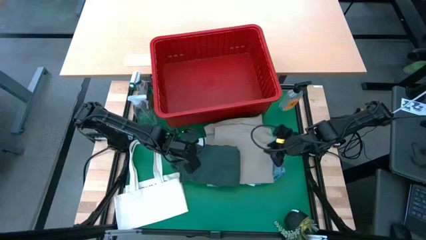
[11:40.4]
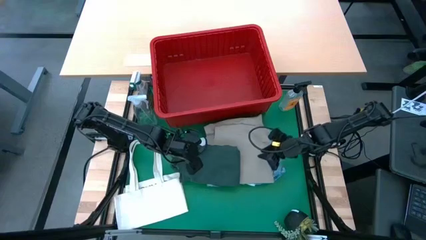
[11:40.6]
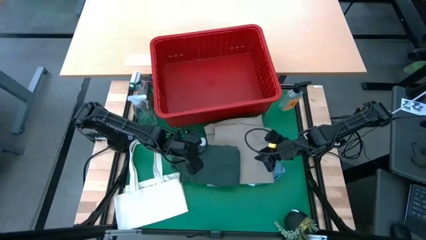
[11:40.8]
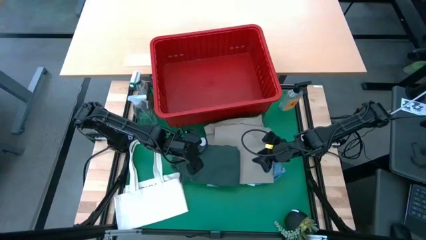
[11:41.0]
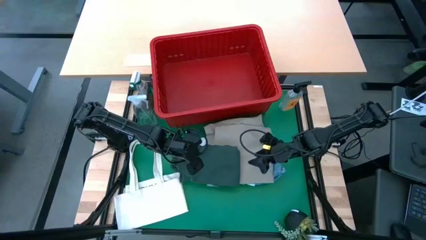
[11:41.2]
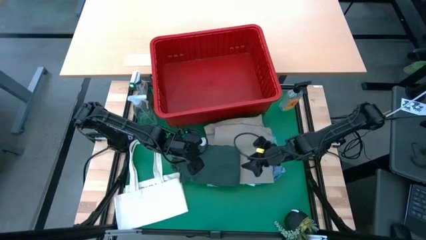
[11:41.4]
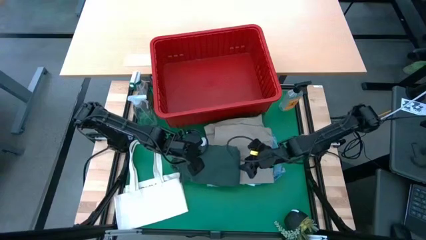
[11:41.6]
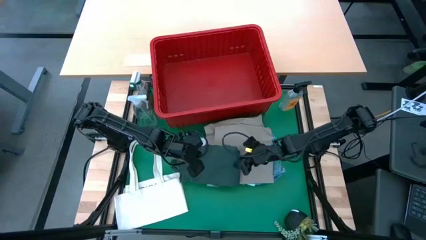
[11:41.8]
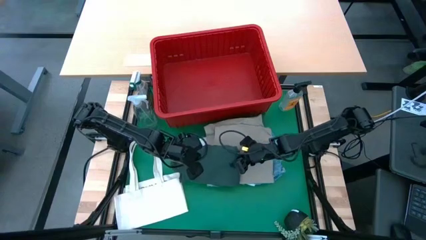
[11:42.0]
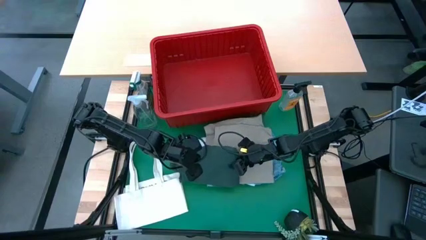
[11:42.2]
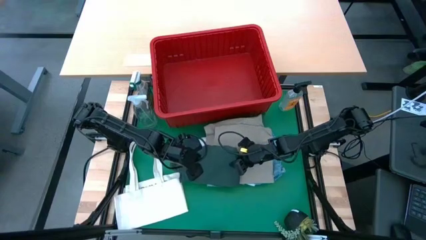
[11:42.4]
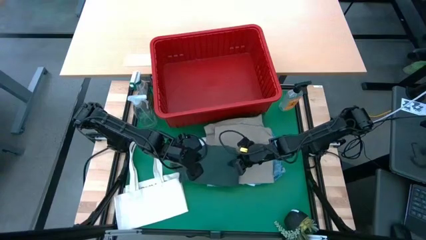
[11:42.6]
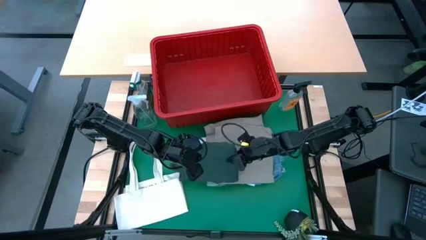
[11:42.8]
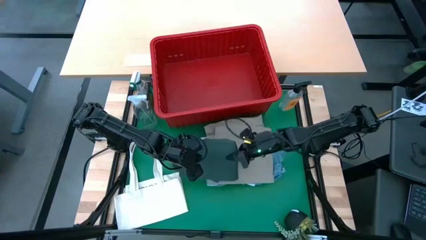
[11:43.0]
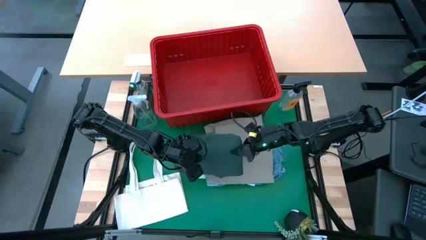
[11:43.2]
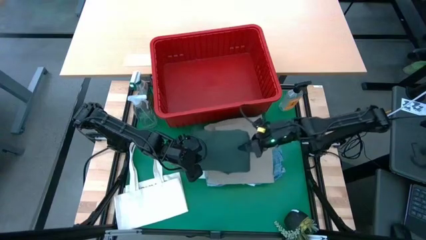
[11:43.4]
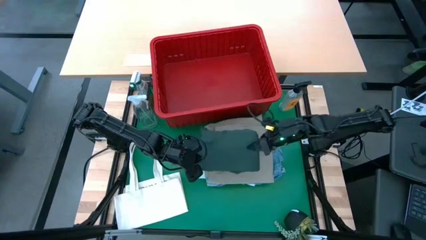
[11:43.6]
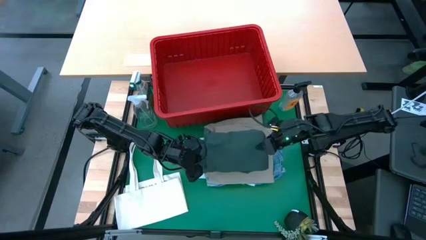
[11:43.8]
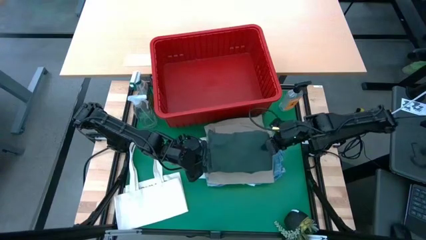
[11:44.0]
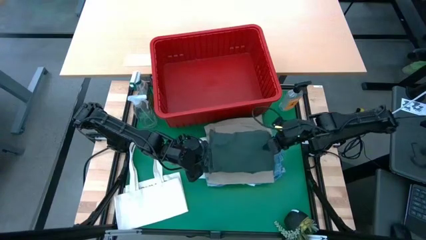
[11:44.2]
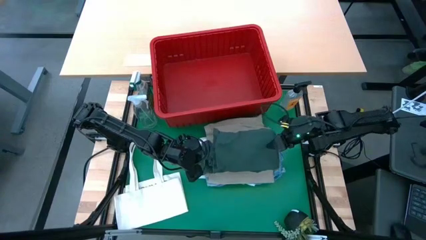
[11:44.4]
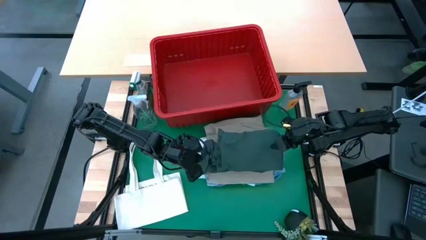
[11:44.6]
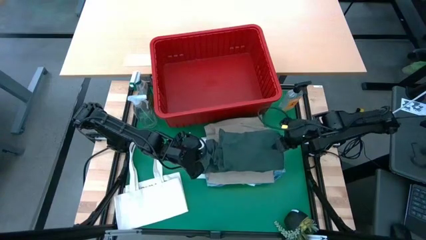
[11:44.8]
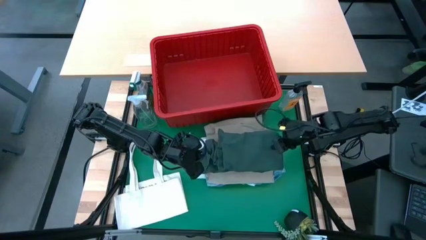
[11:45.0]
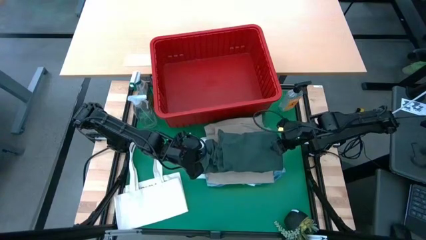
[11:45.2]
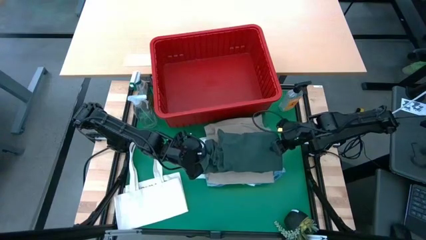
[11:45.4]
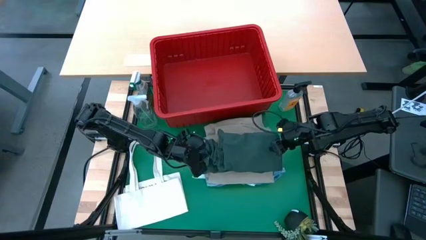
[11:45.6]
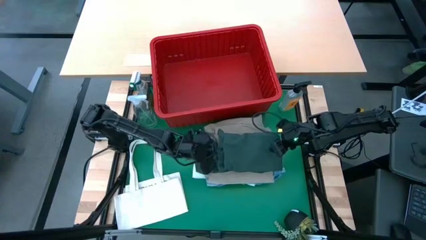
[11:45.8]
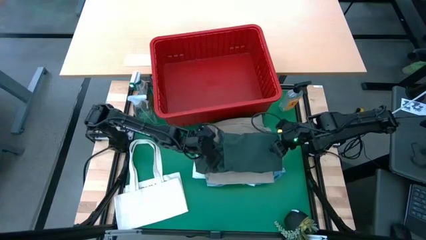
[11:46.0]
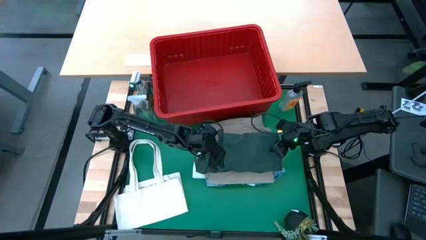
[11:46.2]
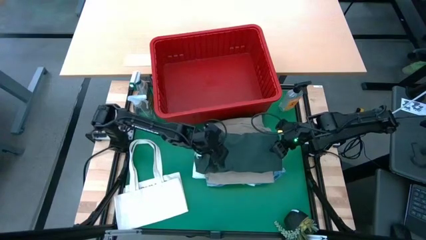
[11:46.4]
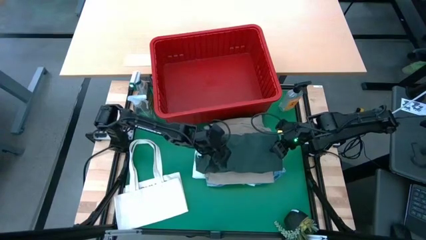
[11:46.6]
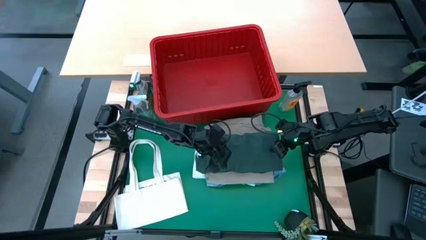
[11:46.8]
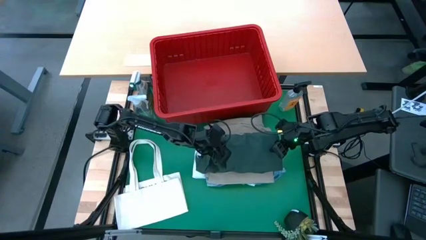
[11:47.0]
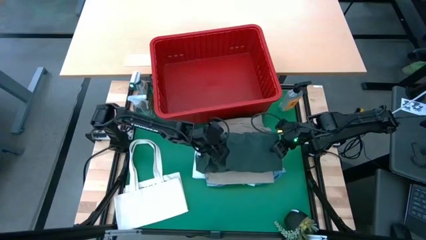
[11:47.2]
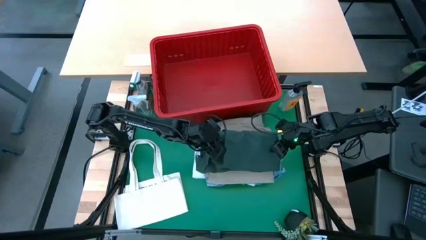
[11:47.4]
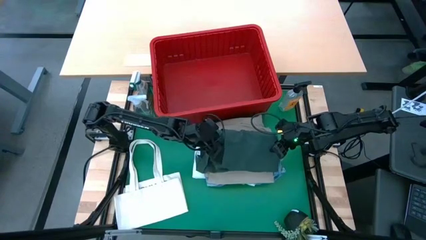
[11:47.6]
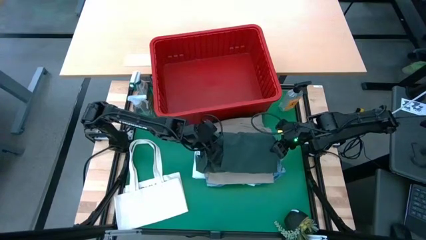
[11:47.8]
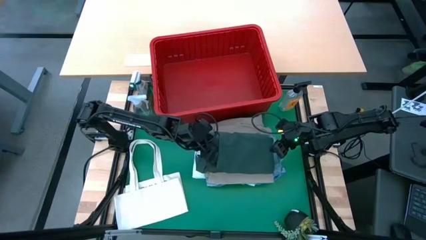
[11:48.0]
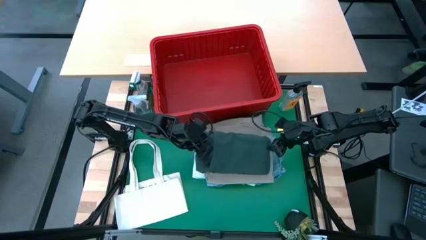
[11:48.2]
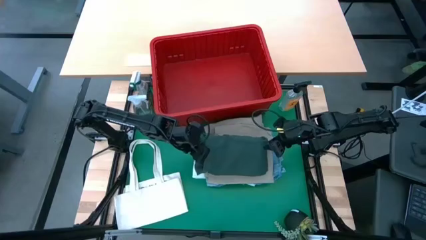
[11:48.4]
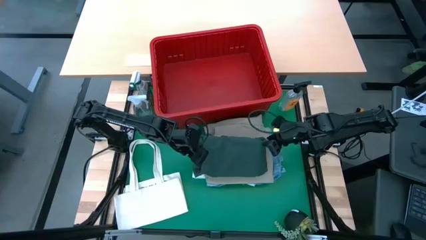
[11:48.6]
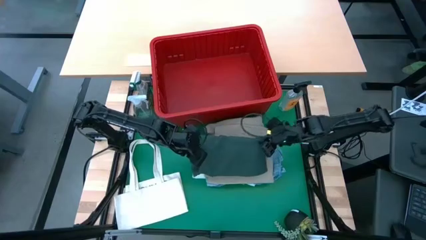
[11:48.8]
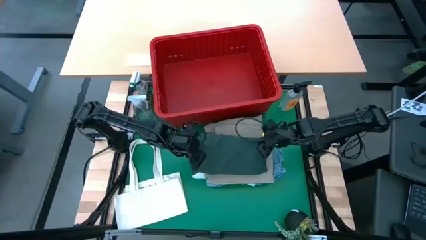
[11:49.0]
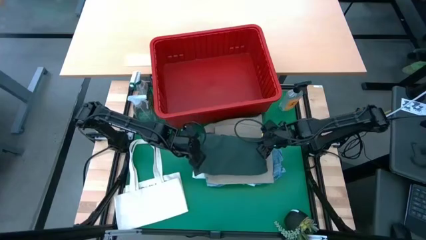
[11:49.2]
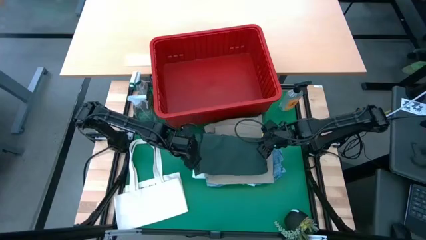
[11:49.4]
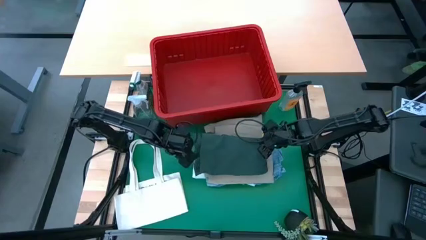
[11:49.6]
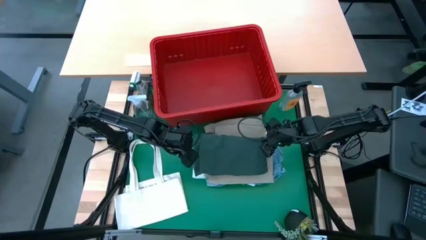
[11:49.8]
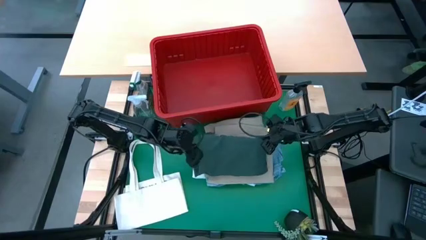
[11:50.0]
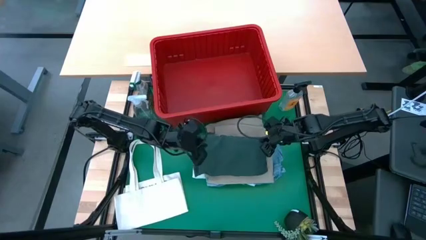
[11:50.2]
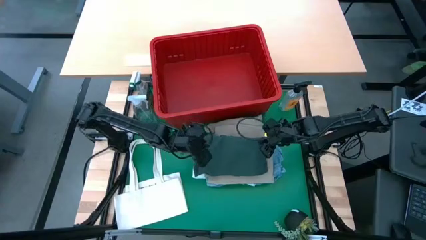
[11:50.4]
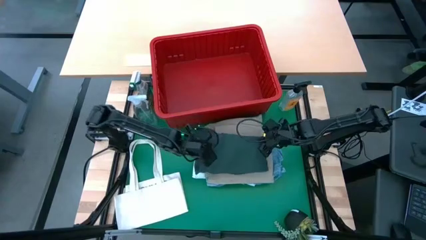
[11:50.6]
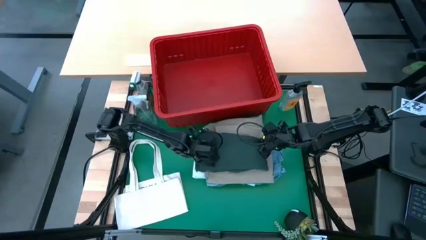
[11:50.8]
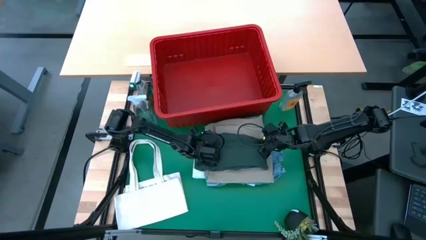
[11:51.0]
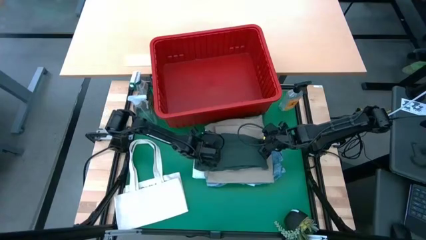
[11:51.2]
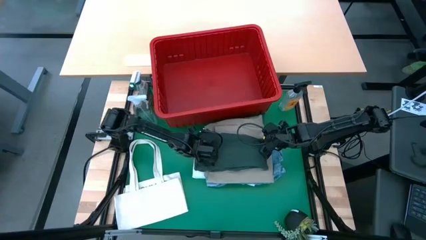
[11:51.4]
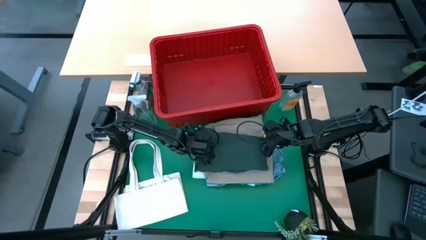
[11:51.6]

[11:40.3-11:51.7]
Task: Fold Laundry from Bin
Stack the folded green polo shirt on top of the folded light brown shorts
